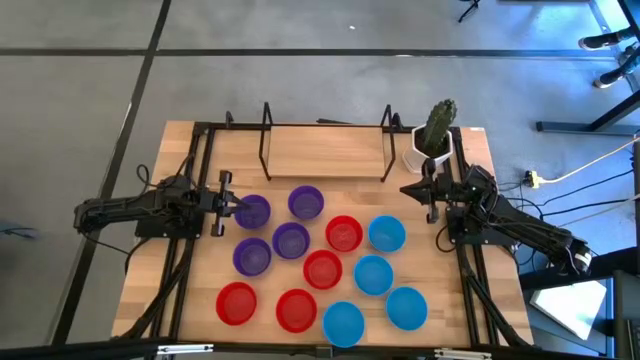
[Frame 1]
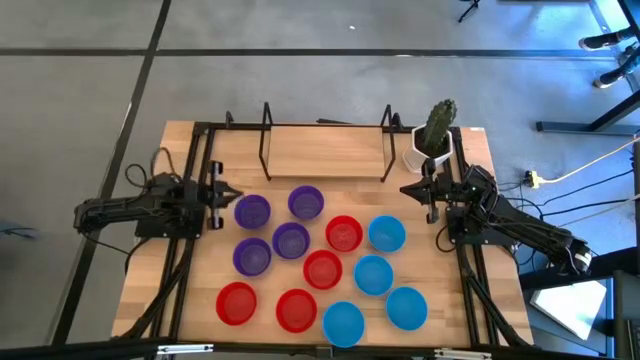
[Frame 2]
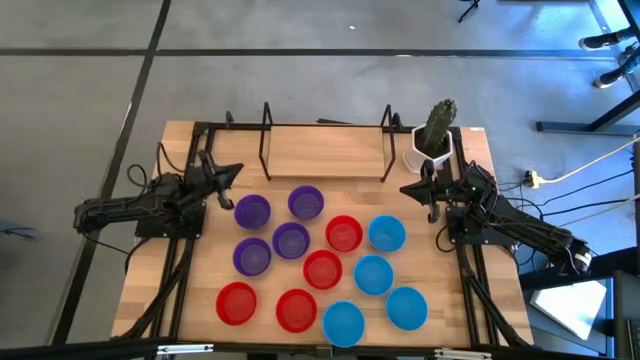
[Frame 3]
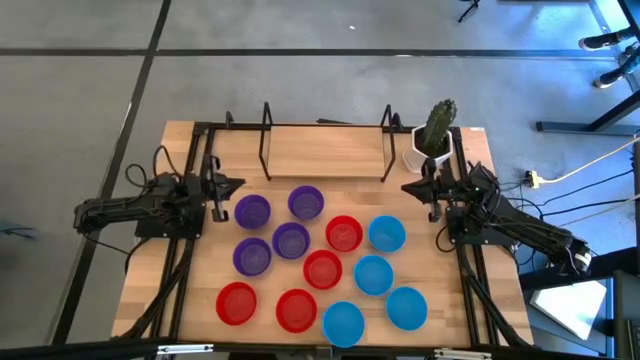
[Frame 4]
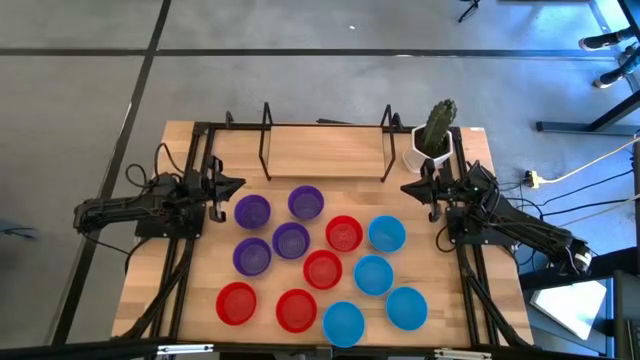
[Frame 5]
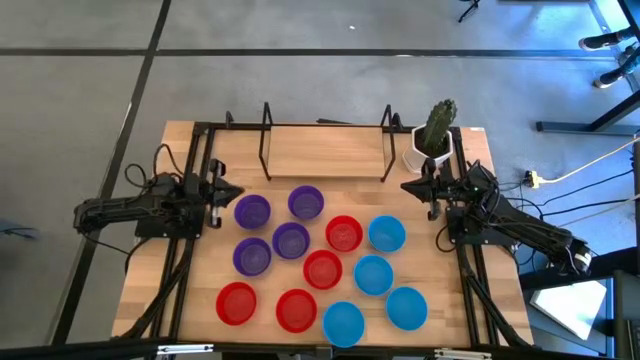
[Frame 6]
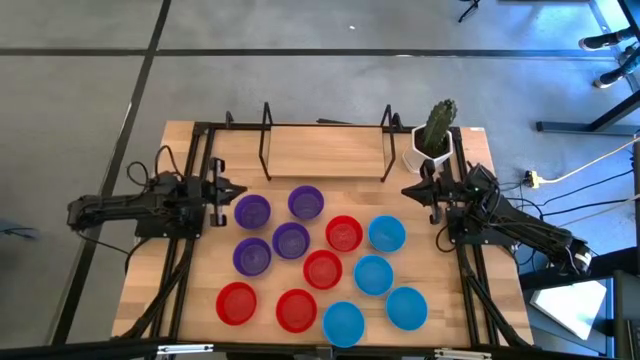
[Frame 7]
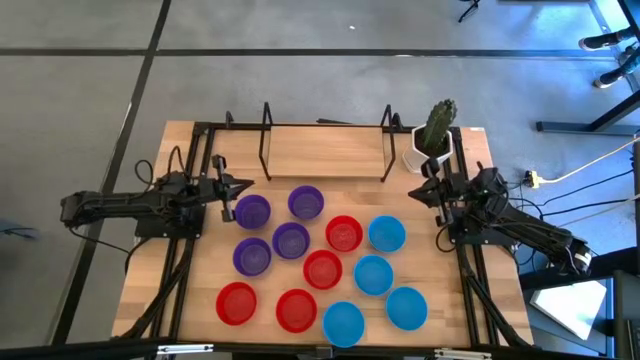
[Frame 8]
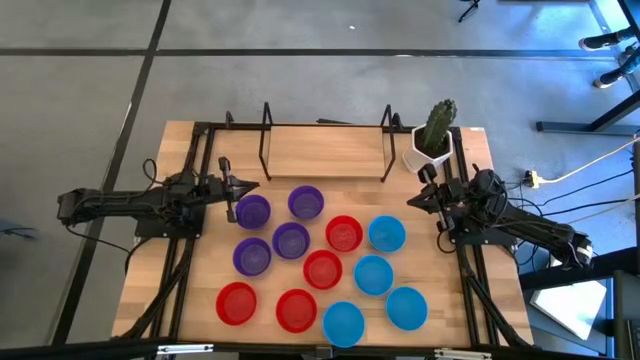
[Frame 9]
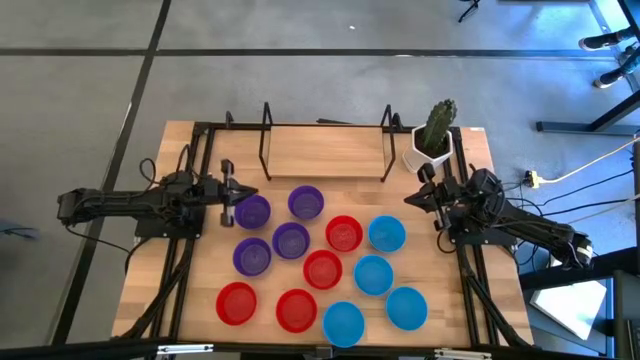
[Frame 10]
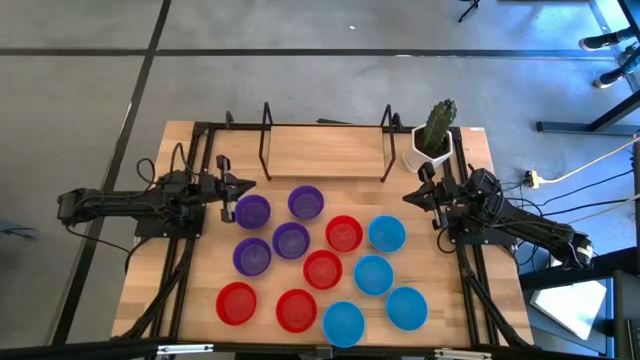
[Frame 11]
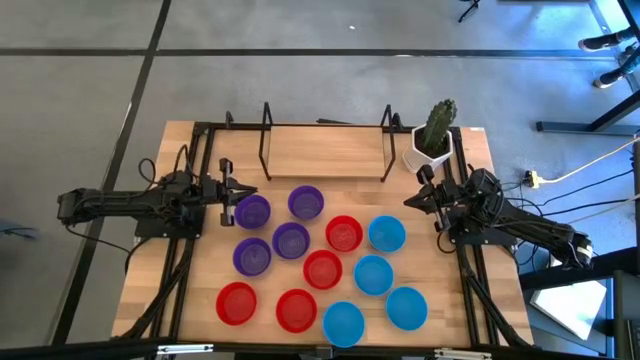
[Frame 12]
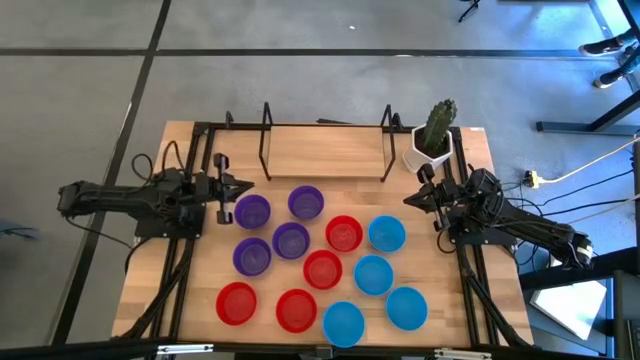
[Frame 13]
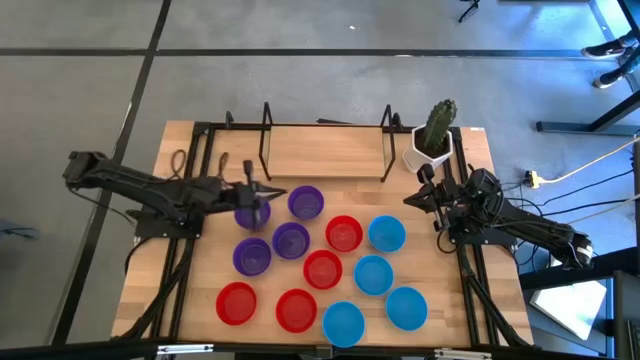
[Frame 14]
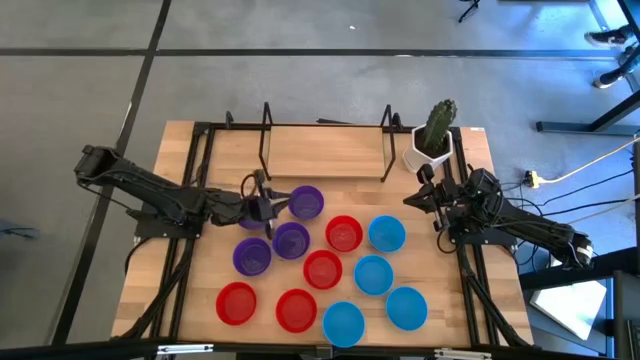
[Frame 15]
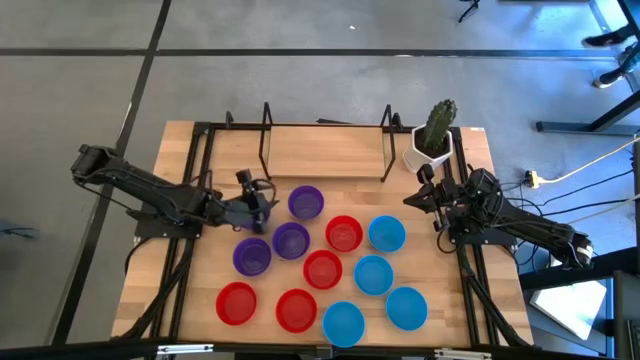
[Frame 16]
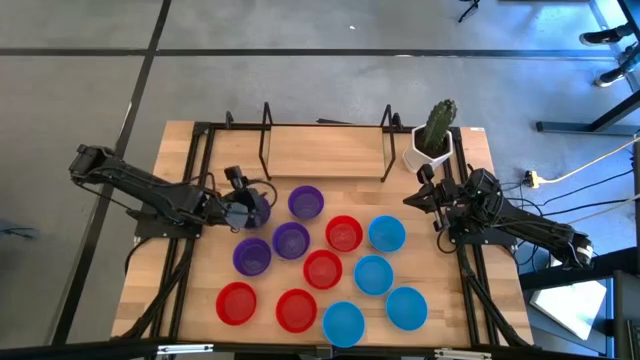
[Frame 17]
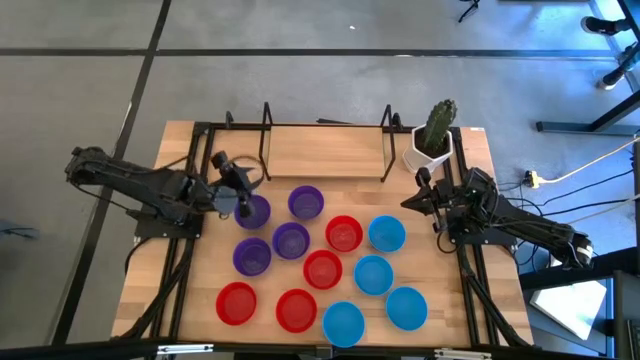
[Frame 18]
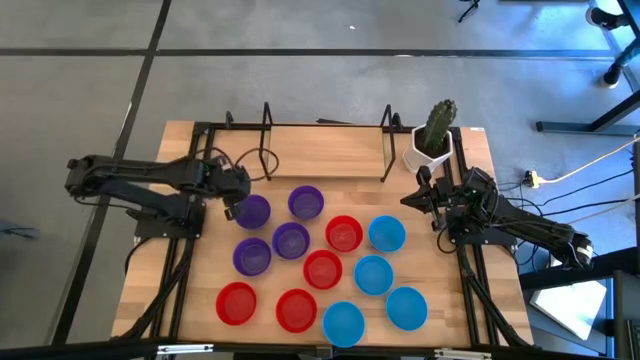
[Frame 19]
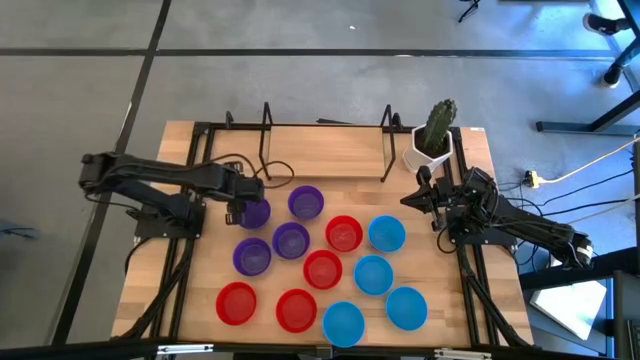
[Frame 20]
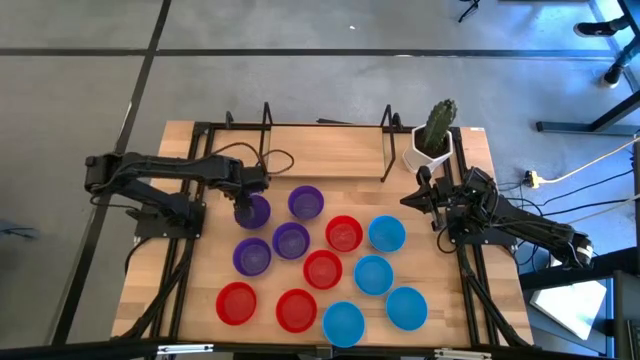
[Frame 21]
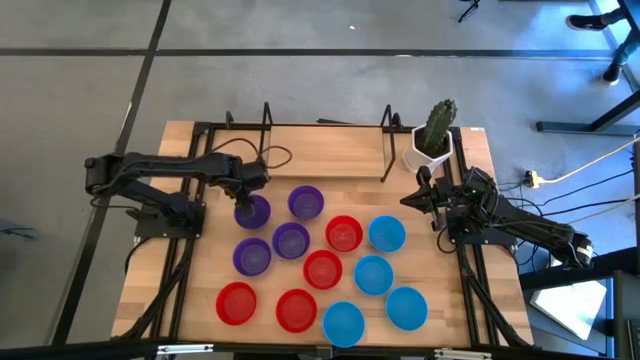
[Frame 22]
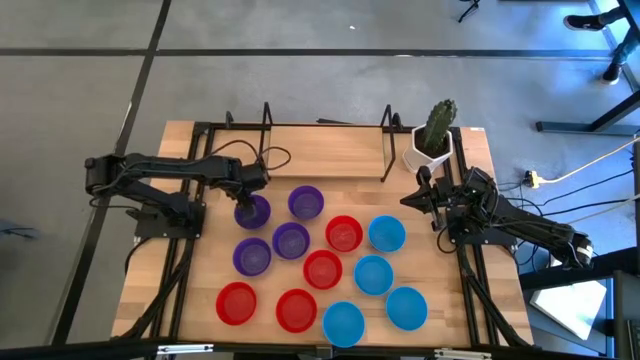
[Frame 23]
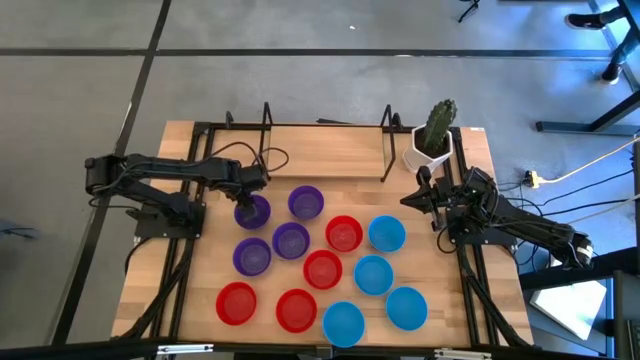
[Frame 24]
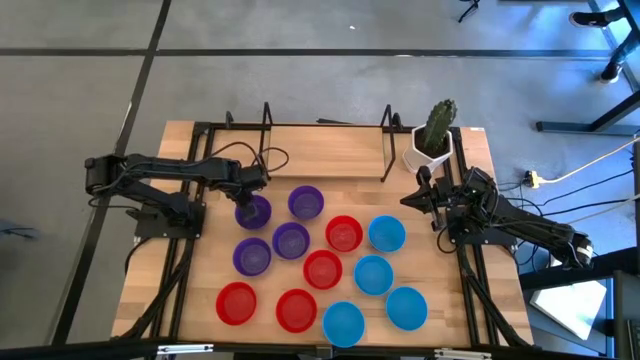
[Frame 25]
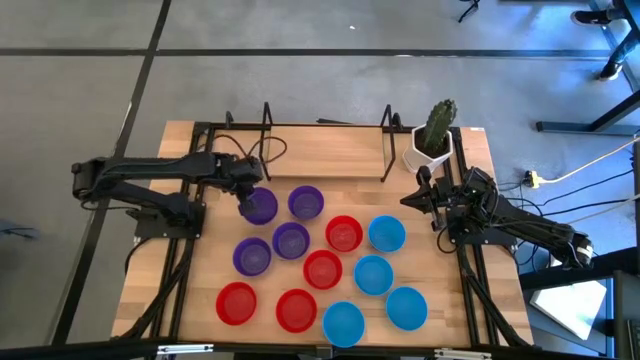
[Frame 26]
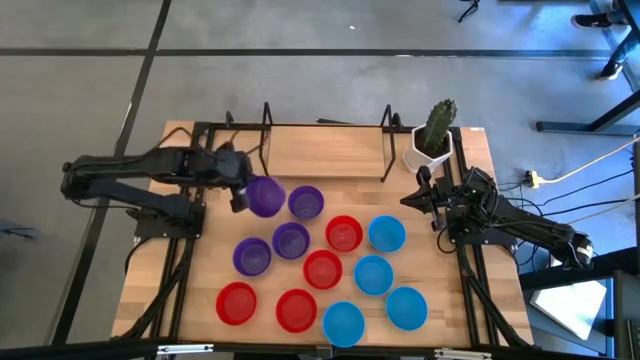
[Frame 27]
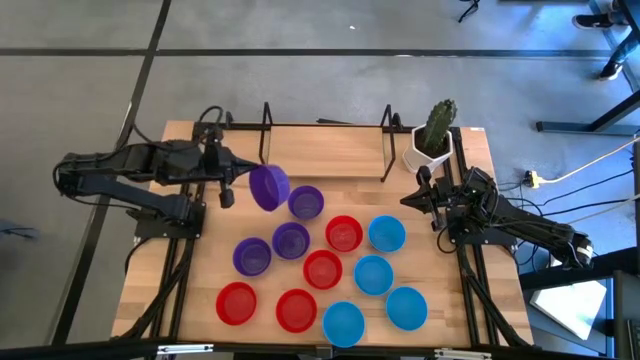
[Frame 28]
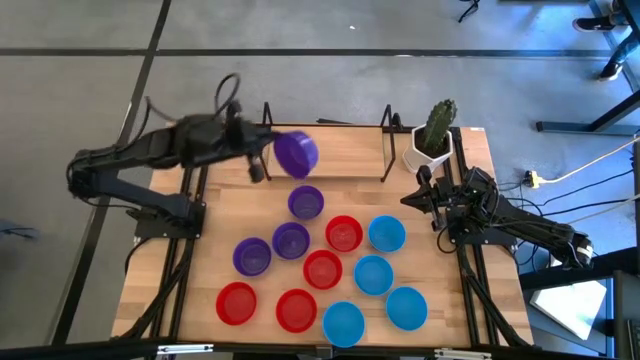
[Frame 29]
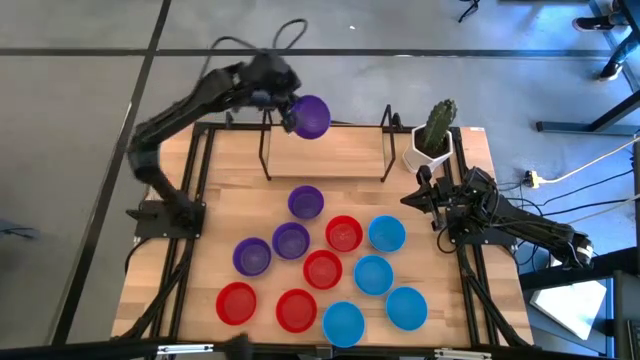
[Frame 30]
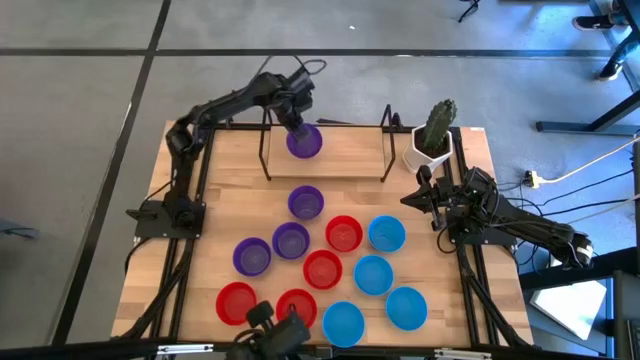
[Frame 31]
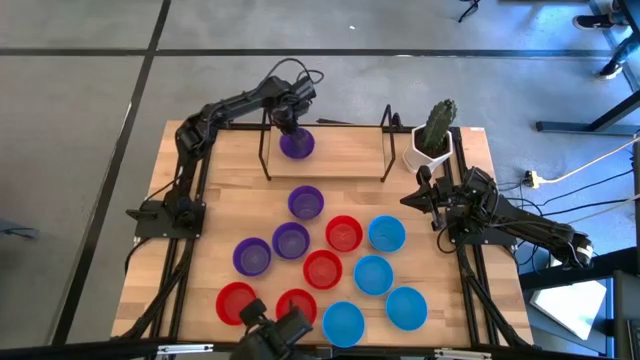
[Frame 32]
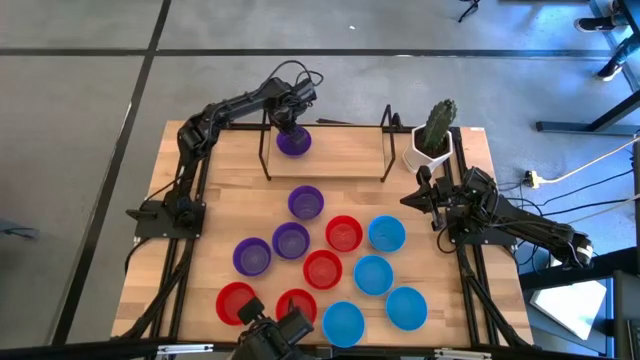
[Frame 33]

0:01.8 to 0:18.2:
Task: Pick & Place Mini bowls
Put the violet bowl on the shelf

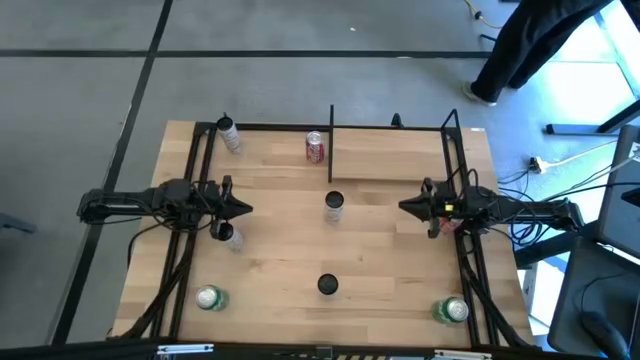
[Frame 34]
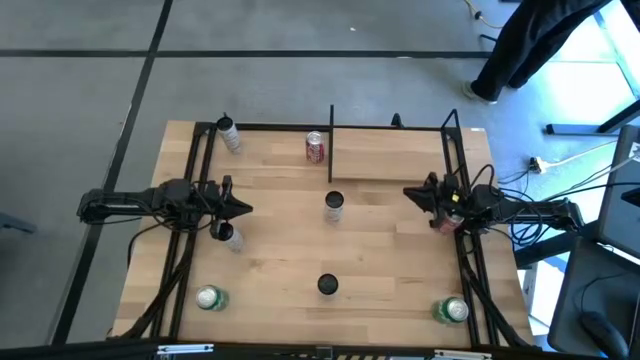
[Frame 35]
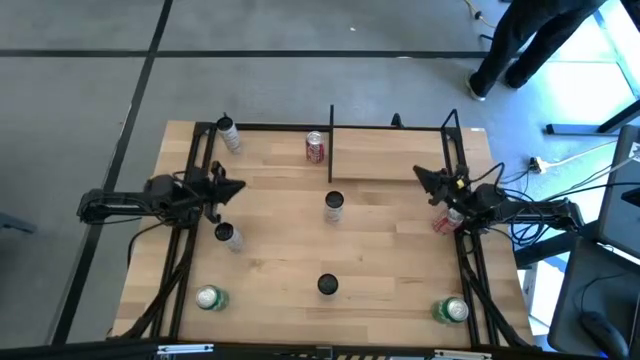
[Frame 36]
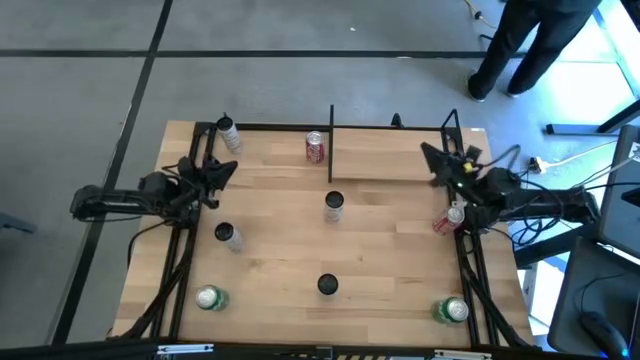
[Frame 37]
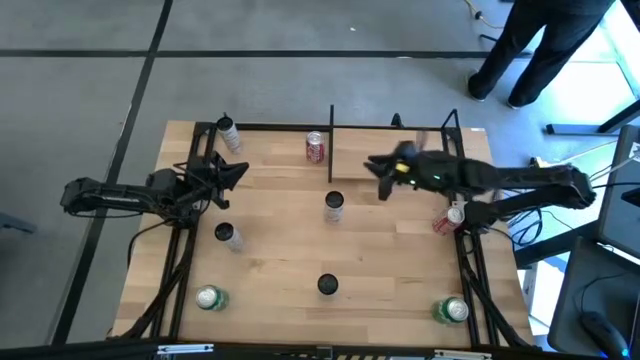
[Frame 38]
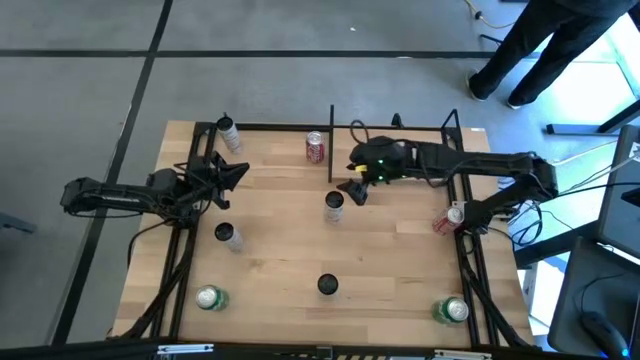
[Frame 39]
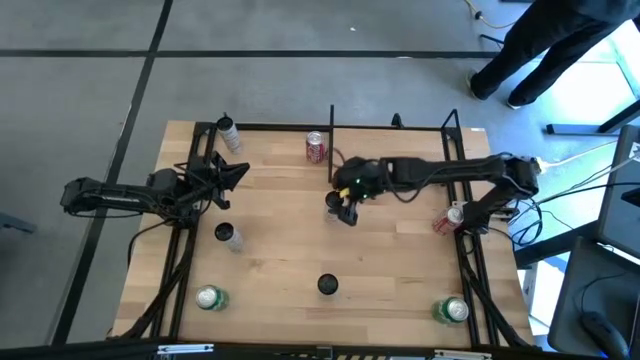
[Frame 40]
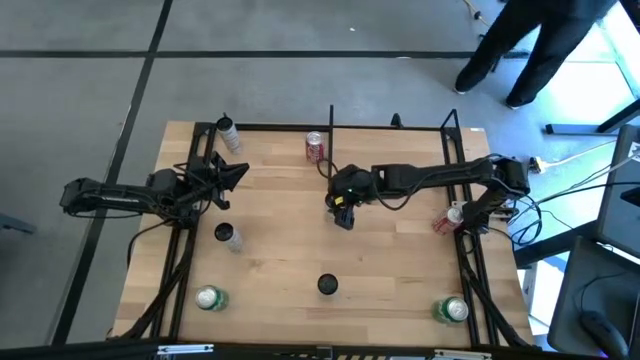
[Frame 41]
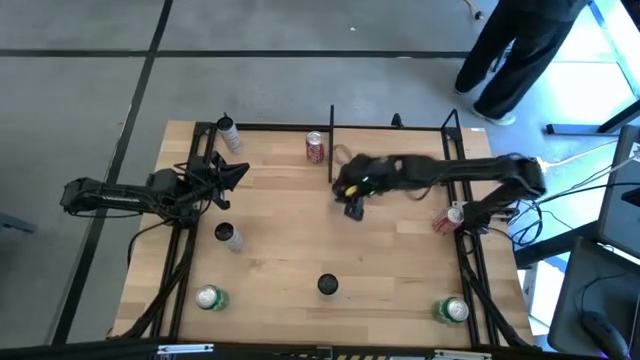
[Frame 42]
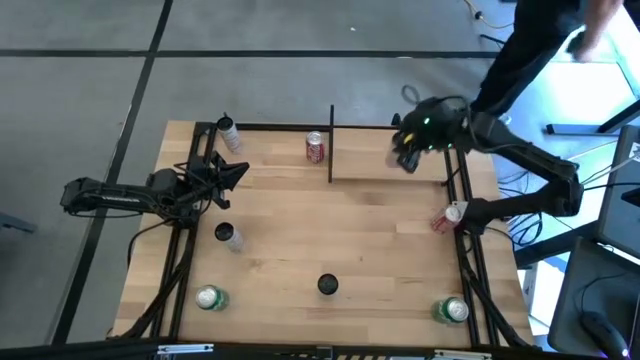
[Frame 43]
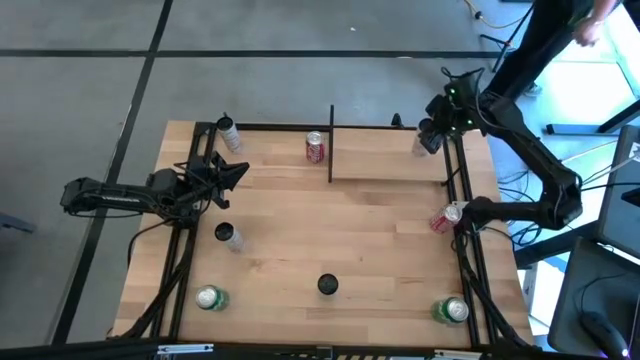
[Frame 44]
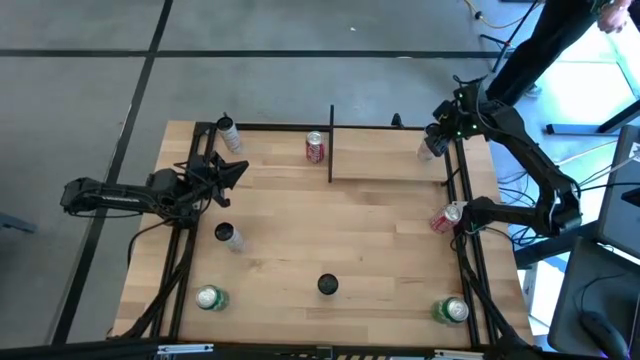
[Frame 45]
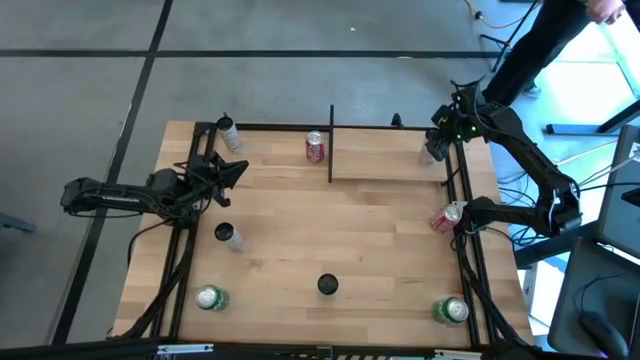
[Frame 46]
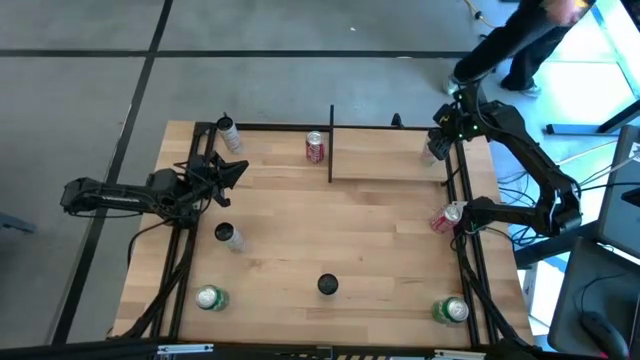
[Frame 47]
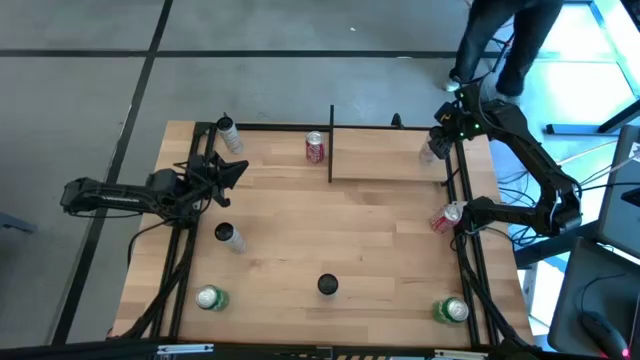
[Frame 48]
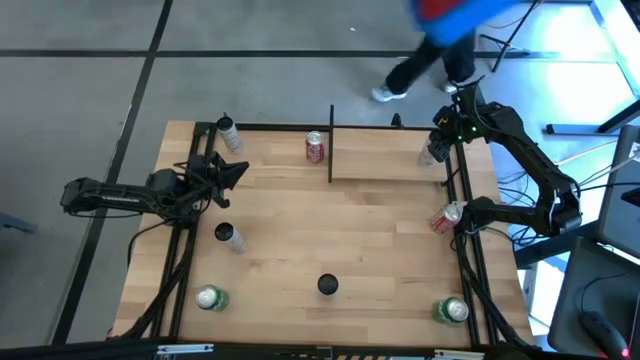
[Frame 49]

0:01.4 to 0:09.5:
Task: Place canned beverage on shelf
Put the top white-pink soda can on the shelf
